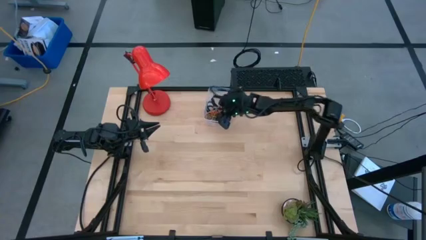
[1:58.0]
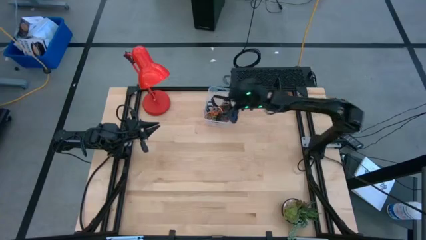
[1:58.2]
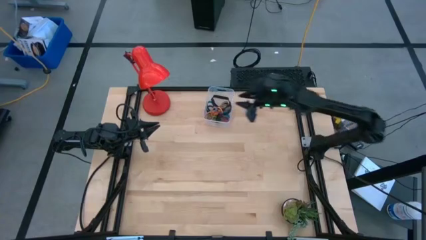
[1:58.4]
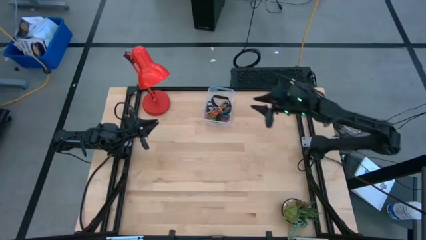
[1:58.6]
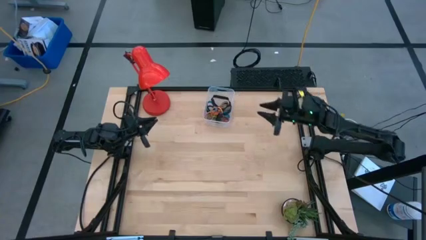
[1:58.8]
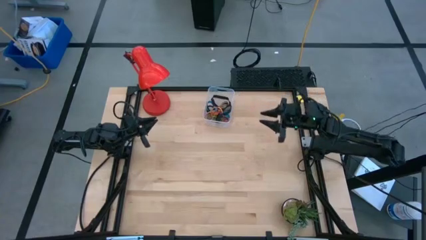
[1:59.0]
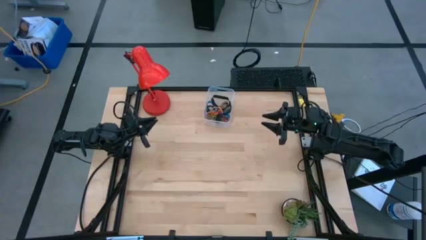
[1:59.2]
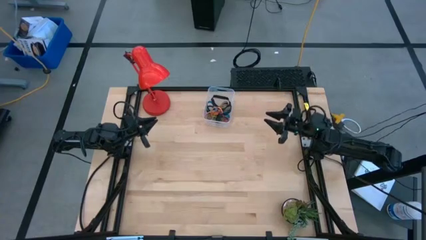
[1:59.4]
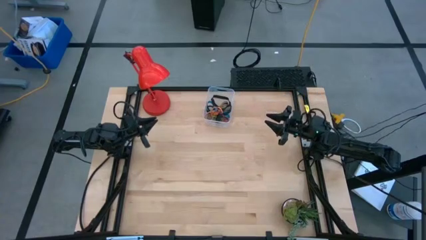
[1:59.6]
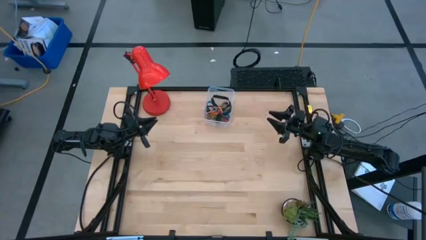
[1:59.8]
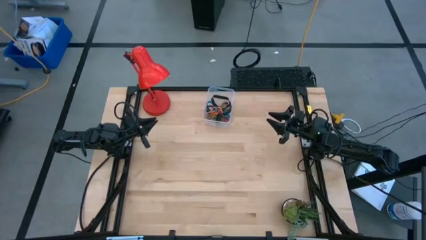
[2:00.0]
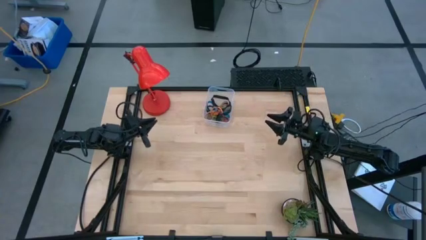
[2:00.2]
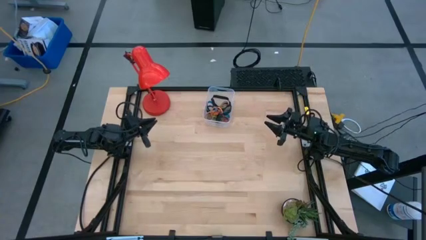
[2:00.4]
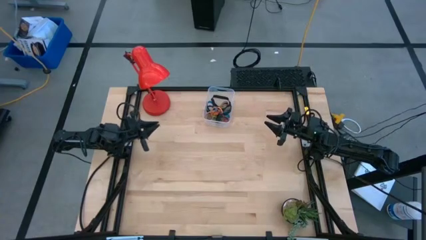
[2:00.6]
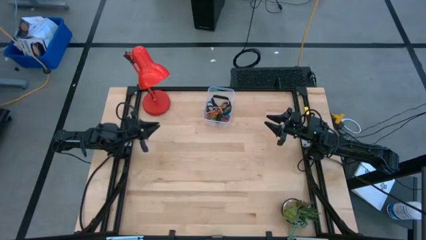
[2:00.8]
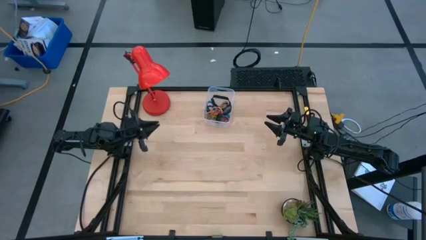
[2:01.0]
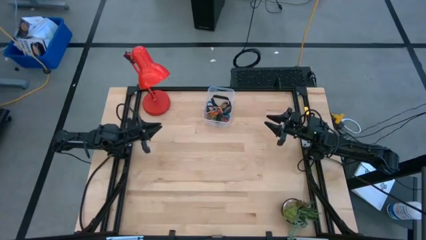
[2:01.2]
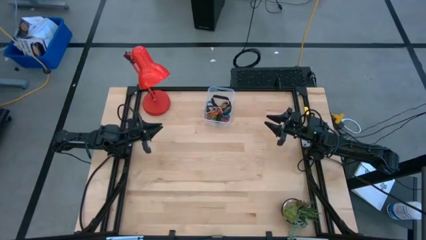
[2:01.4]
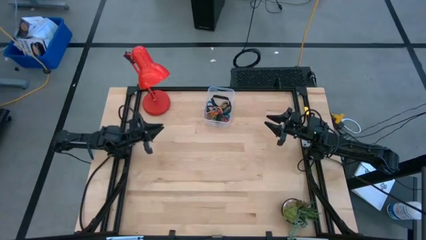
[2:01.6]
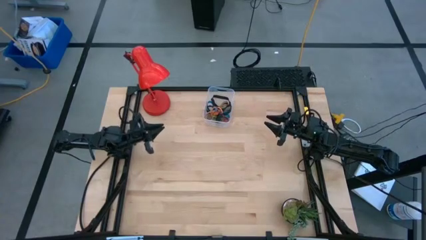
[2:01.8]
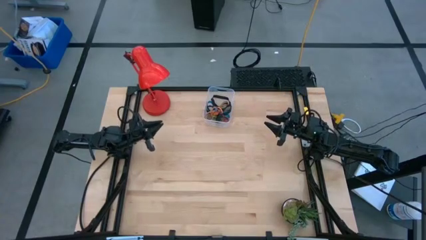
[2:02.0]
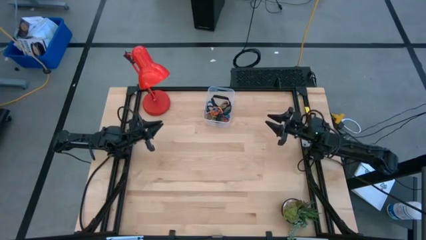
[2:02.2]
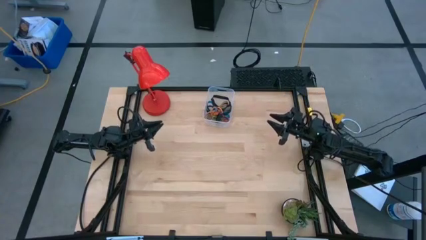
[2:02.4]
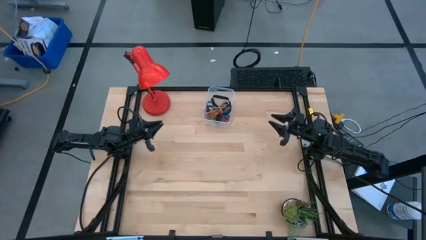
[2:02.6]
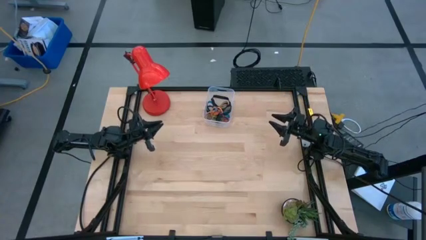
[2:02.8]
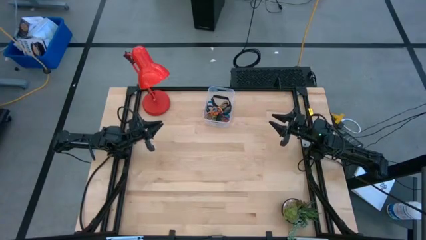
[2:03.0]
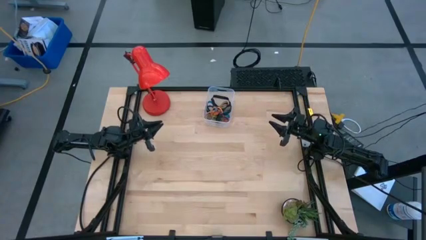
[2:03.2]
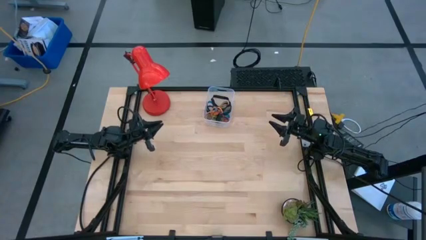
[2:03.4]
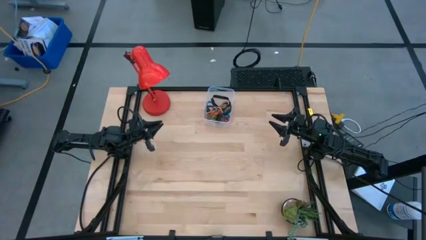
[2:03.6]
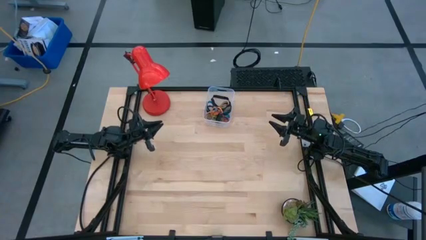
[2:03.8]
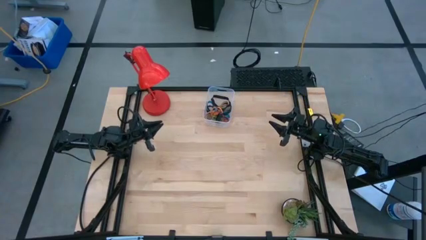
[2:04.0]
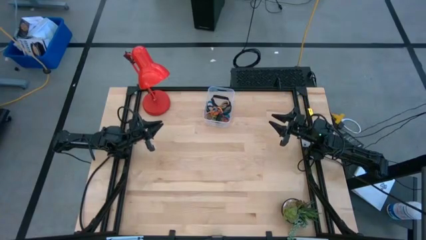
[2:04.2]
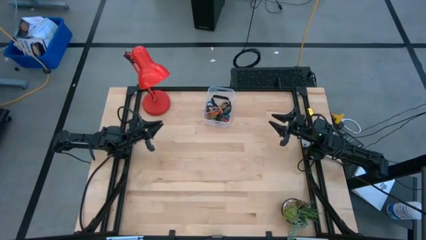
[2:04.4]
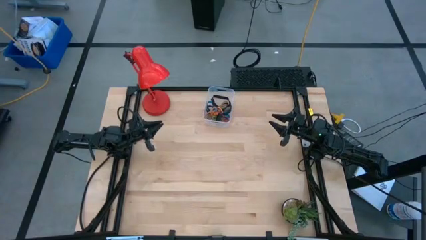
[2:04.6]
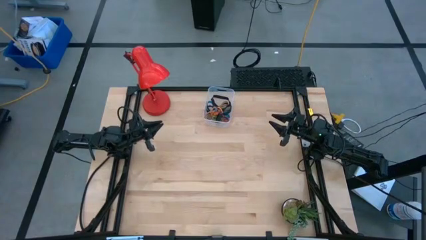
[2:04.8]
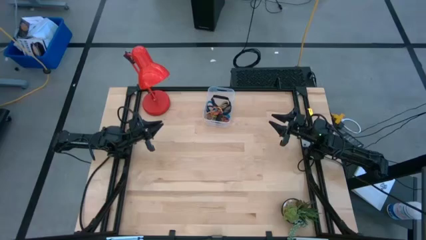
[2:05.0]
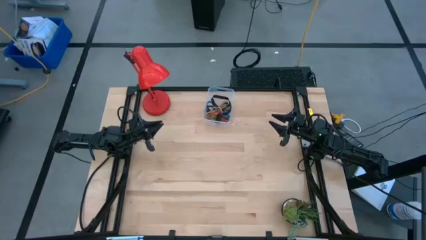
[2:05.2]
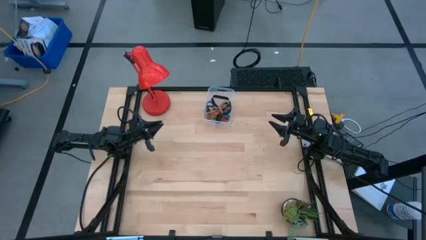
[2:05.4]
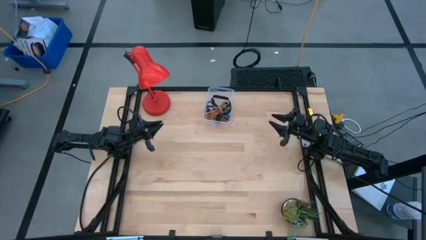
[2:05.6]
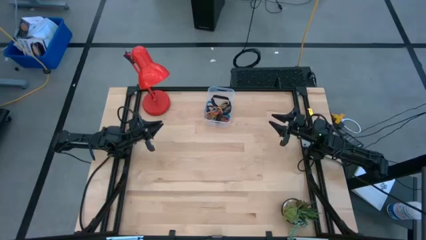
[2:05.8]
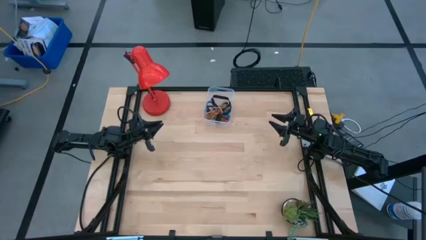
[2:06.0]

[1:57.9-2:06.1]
Task: Pick and place rubber bands into bin
Return to Home Position

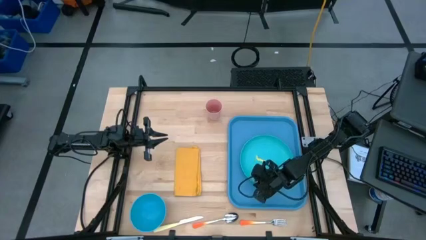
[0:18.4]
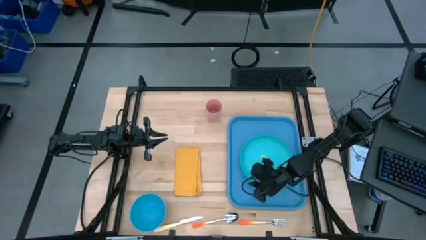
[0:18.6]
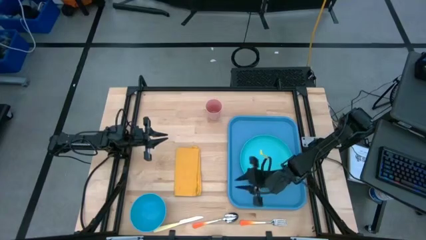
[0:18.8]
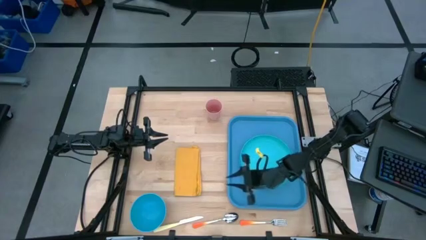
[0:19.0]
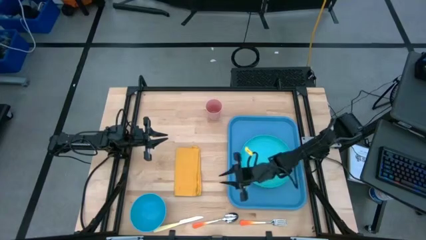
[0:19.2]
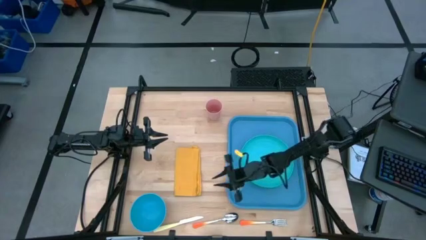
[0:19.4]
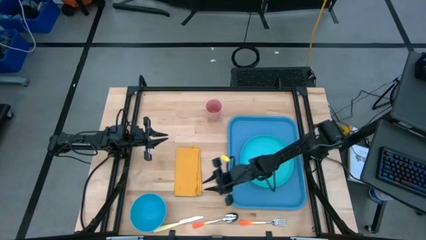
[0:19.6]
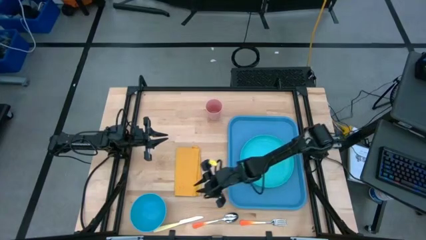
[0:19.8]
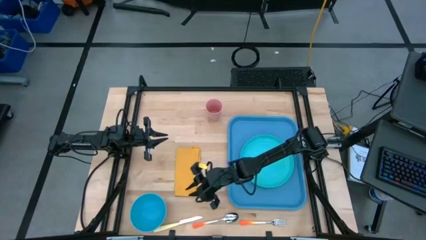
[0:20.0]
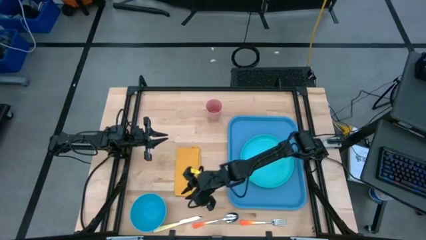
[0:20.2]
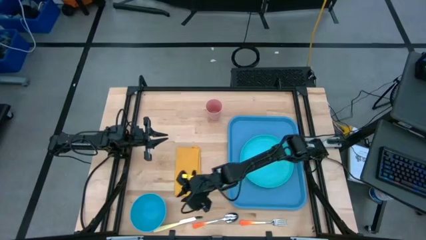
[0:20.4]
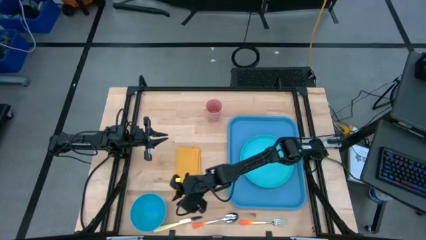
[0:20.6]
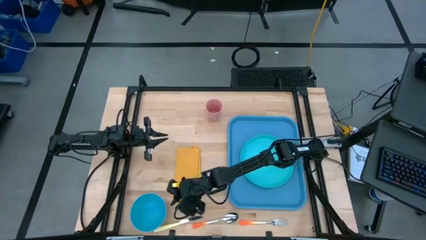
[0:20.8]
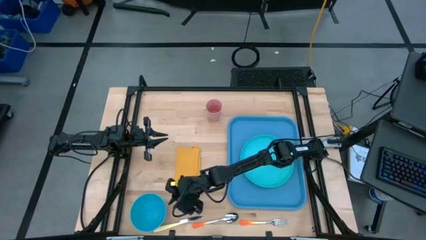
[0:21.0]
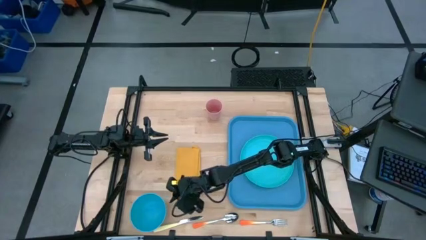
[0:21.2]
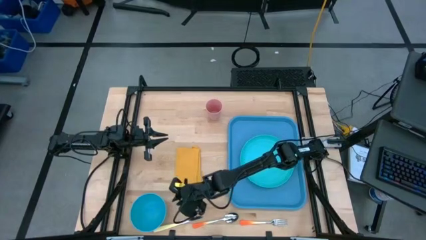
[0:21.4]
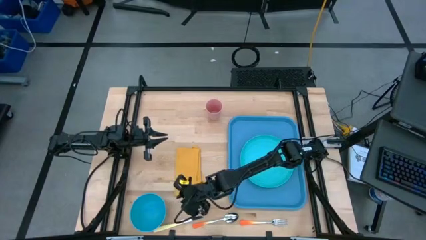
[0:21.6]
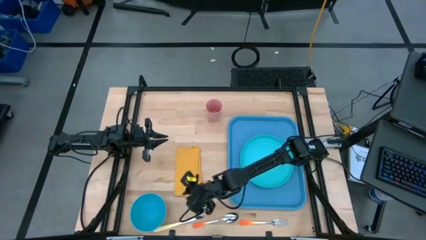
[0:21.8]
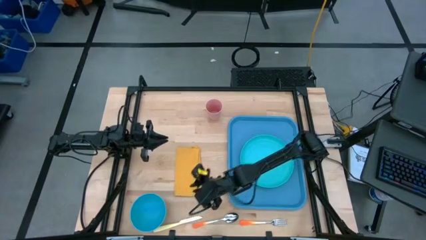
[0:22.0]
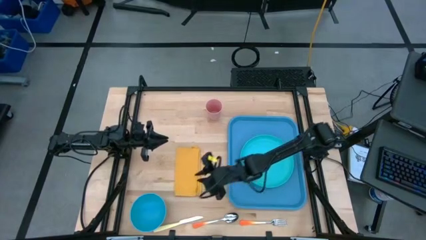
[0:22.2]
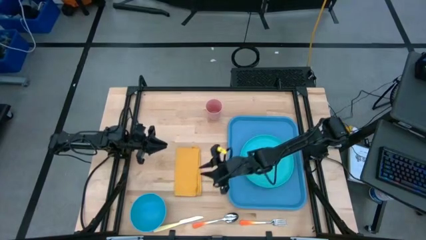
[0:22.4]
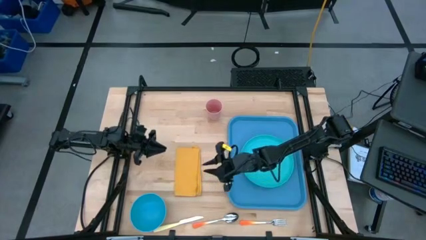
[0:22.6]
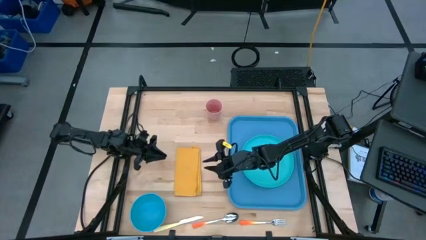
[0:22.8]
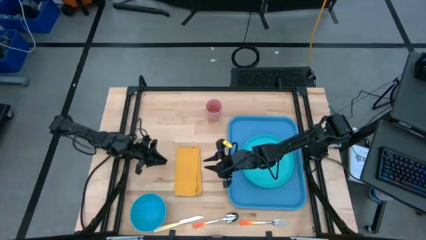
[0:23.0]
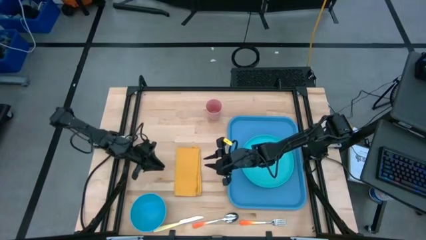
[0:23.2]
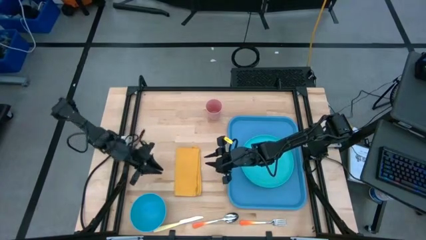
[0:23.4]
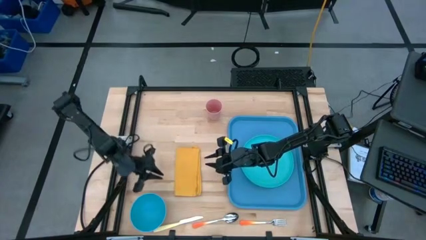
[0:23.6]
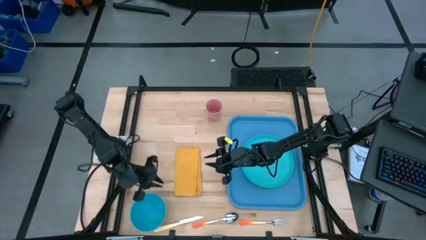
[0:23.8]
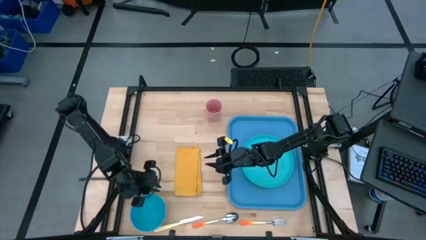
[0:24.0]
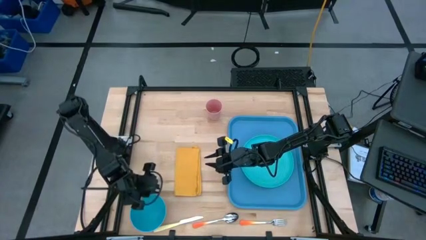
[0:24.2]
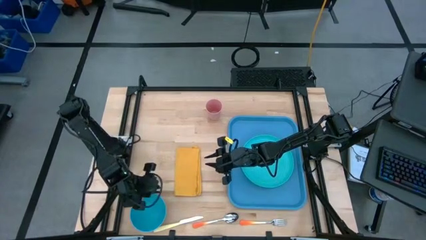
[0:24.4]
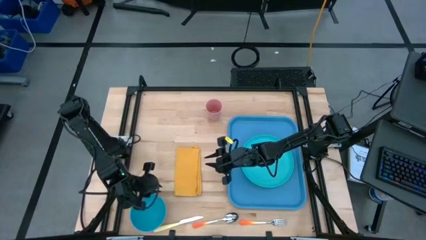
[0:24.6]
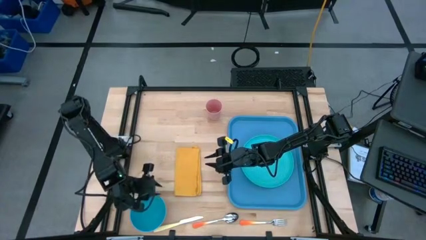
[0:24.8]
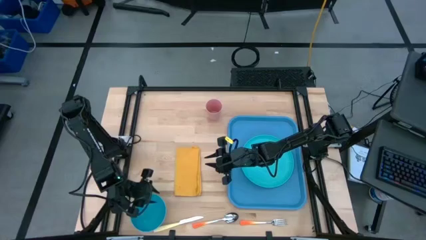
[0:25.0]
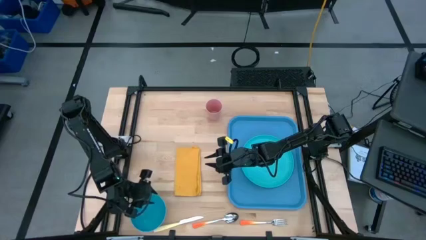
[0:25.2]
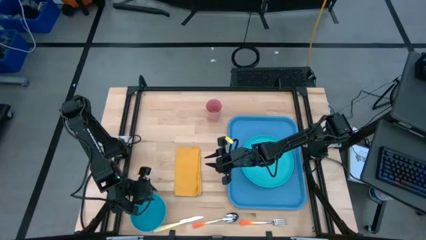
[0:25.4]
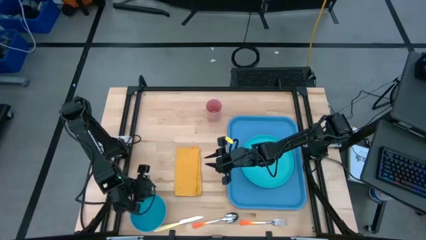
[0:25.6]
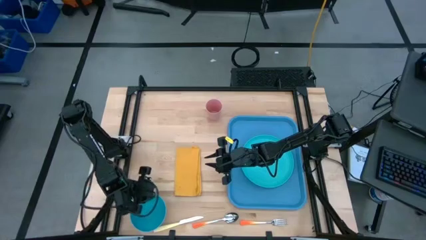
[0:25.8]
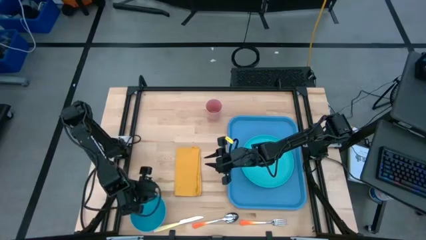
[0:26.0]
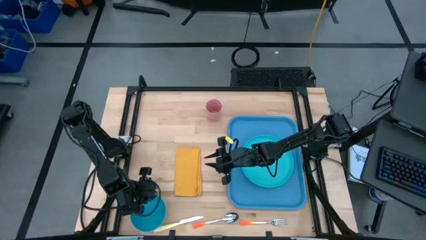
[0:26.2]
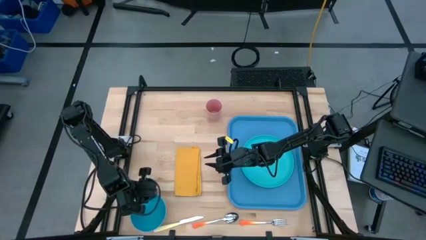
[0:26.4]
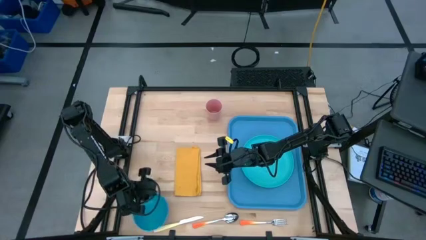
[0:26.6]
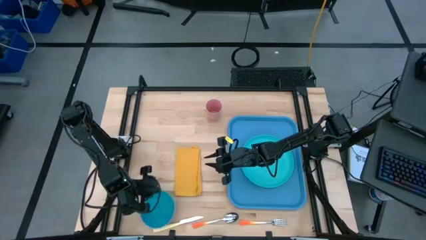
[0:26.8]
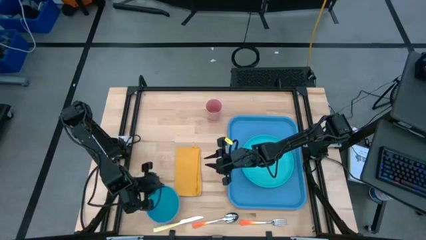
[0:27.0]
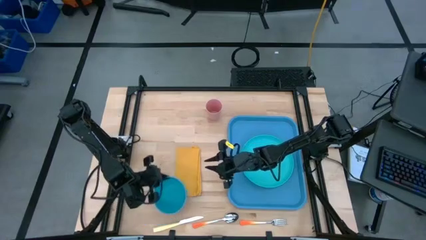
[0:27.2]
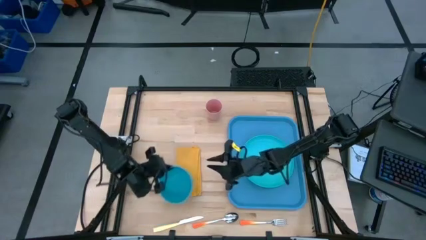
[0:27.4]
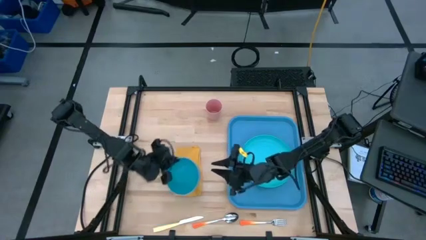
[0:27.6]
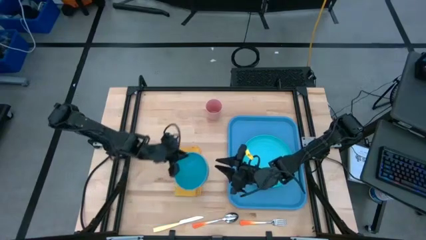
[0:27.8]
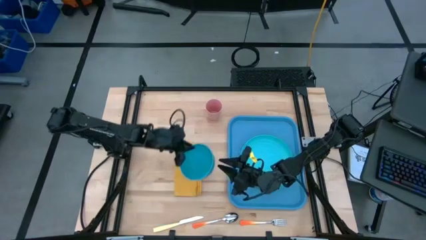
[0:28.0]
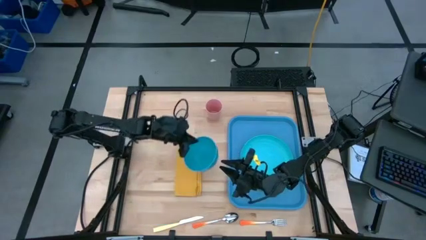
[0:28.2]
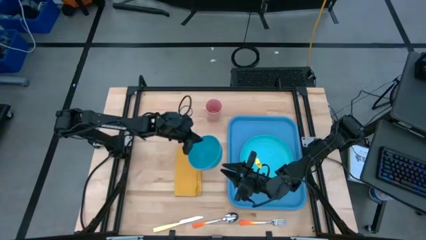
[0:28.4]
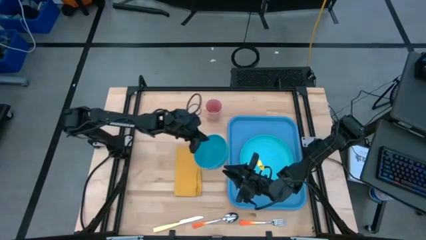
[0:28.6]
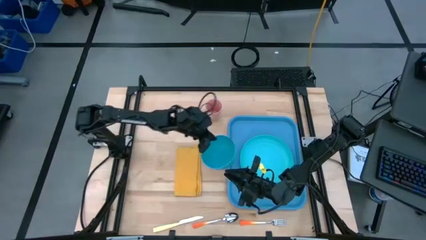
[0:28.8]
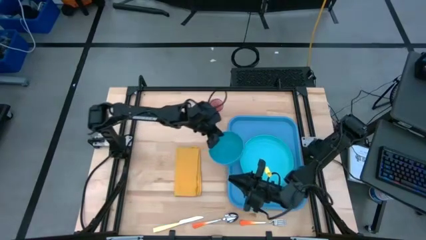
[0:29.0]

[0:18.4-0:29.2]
Task: Set up tray
Put the bowl on the blue plate on the blue tray
